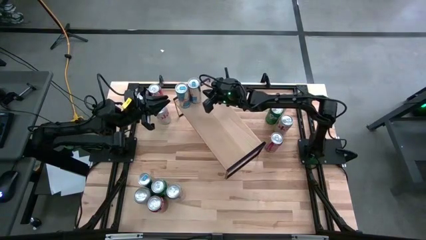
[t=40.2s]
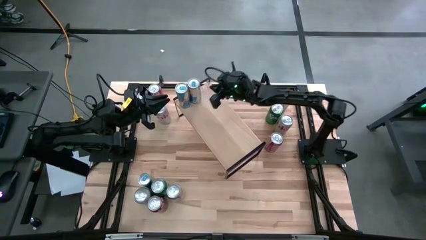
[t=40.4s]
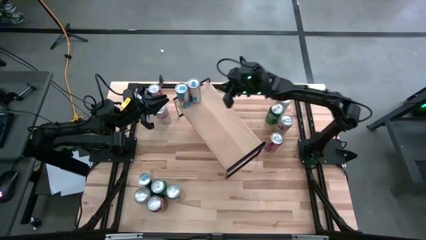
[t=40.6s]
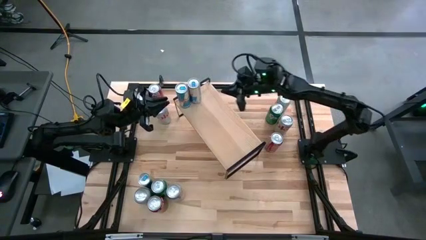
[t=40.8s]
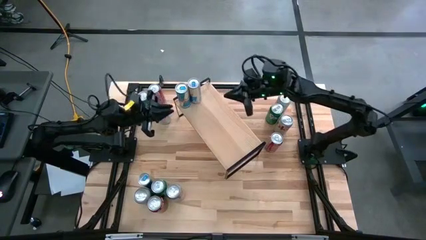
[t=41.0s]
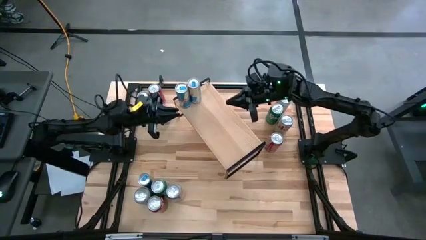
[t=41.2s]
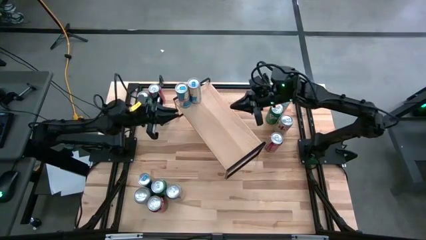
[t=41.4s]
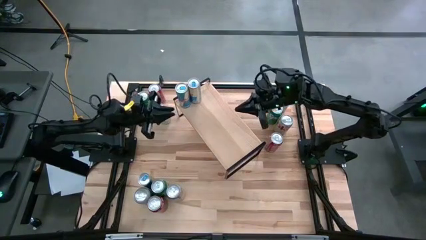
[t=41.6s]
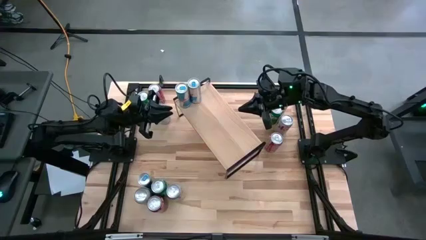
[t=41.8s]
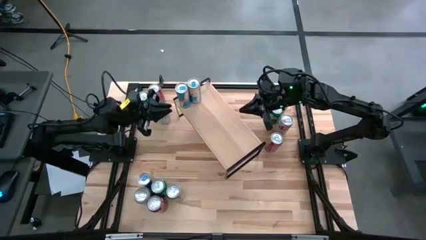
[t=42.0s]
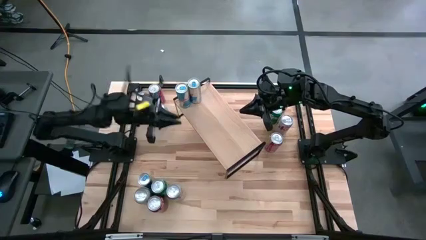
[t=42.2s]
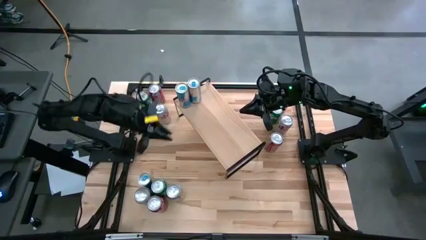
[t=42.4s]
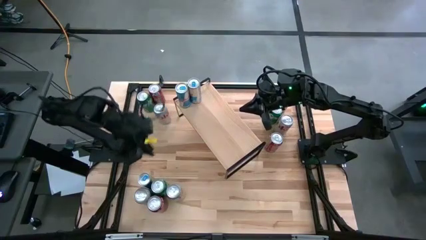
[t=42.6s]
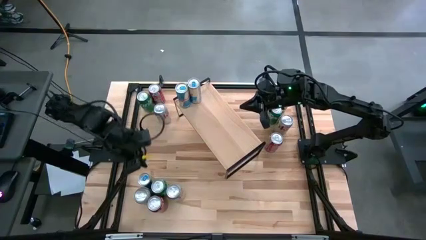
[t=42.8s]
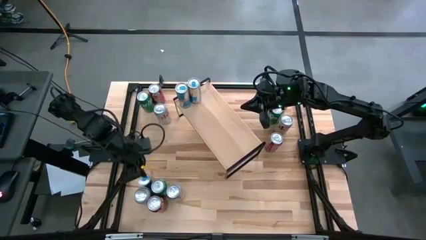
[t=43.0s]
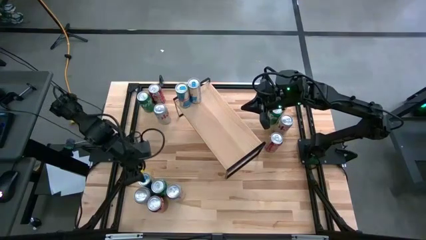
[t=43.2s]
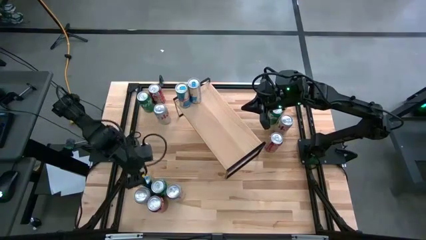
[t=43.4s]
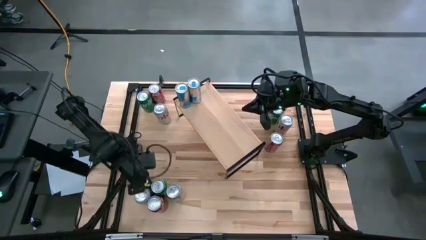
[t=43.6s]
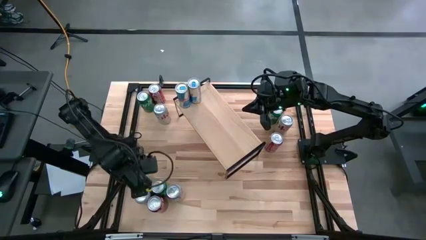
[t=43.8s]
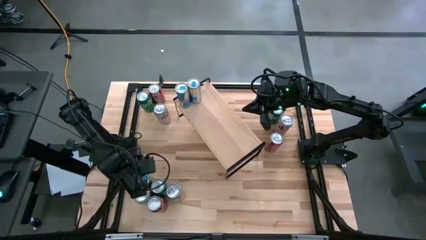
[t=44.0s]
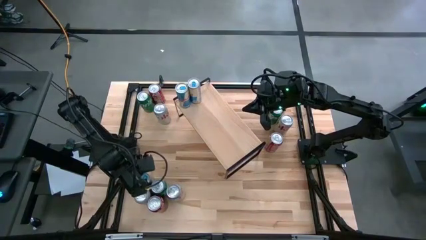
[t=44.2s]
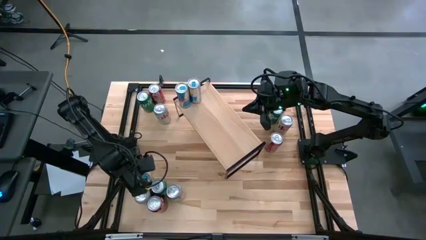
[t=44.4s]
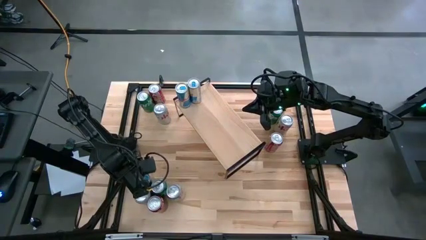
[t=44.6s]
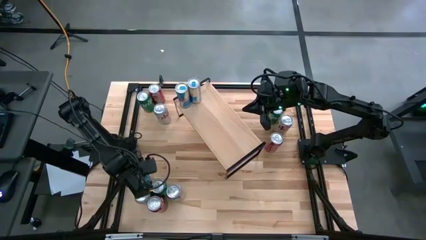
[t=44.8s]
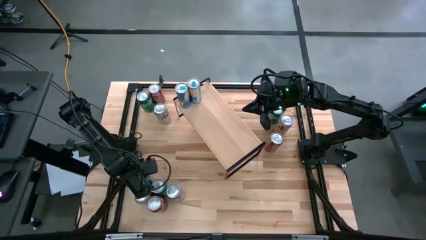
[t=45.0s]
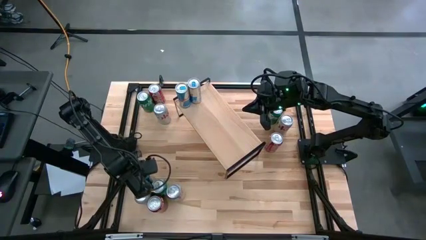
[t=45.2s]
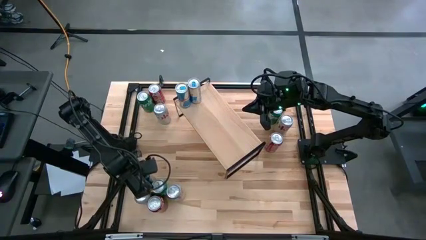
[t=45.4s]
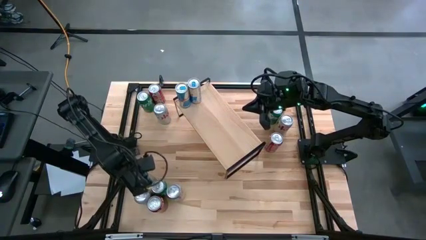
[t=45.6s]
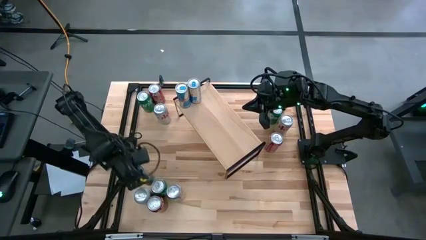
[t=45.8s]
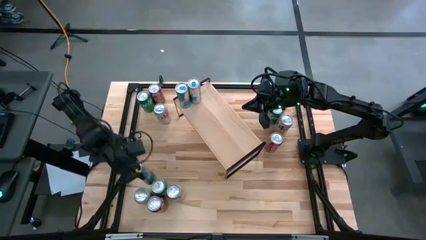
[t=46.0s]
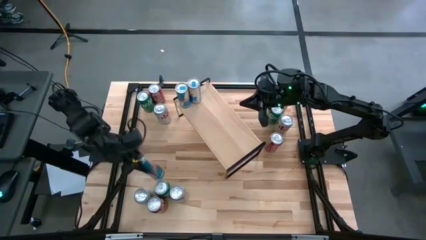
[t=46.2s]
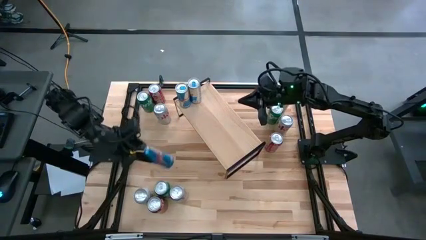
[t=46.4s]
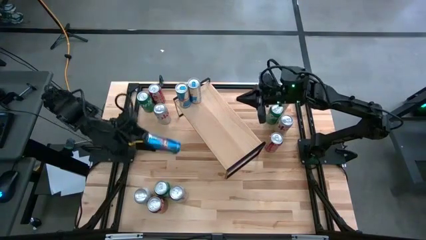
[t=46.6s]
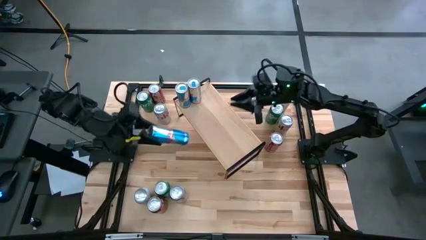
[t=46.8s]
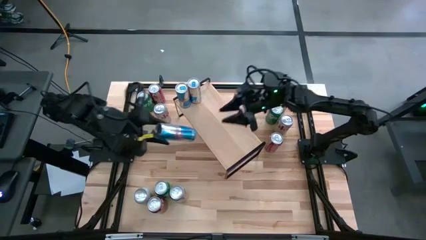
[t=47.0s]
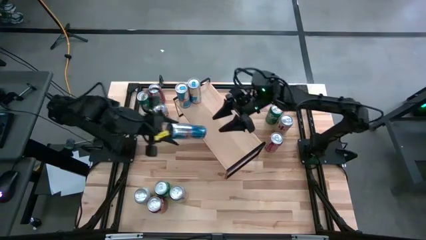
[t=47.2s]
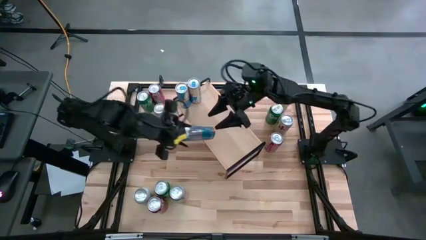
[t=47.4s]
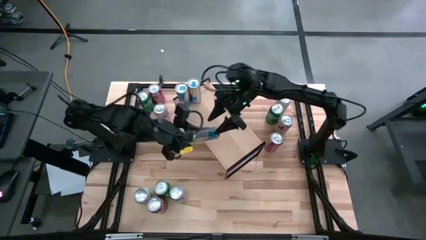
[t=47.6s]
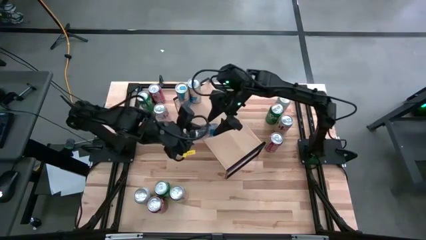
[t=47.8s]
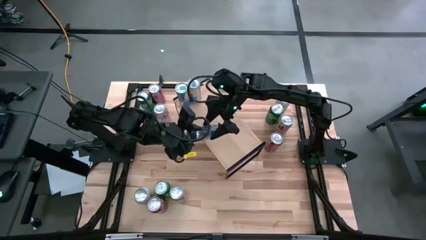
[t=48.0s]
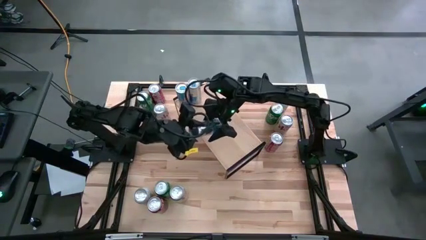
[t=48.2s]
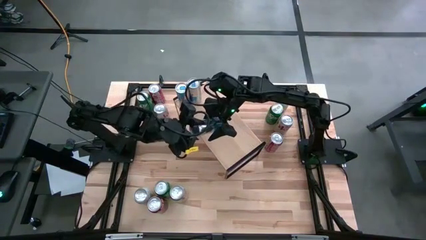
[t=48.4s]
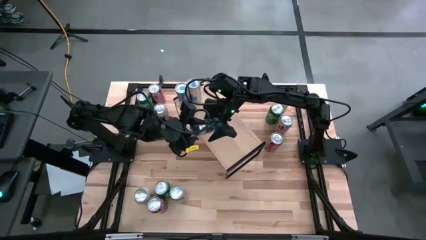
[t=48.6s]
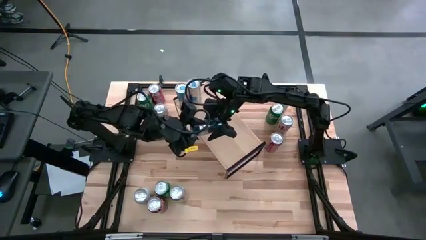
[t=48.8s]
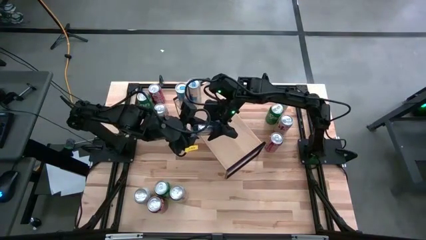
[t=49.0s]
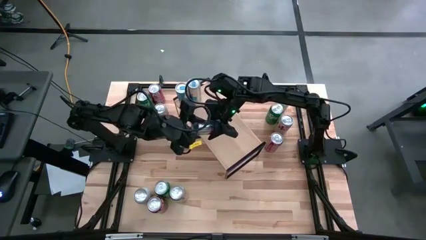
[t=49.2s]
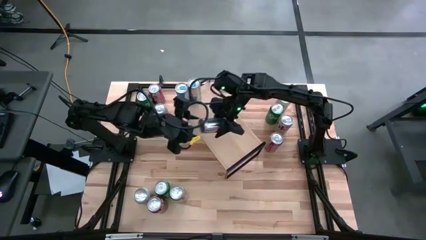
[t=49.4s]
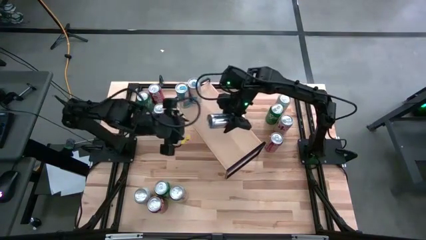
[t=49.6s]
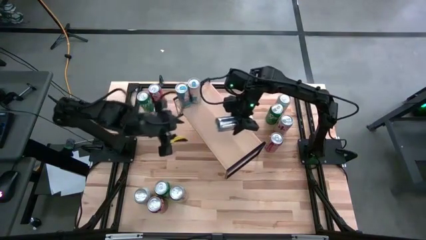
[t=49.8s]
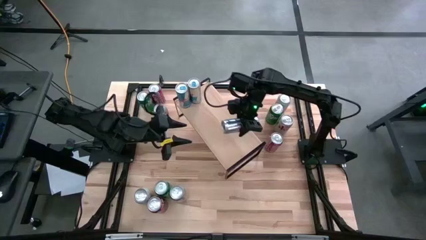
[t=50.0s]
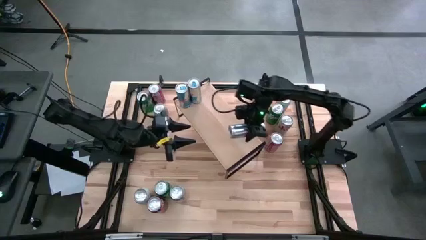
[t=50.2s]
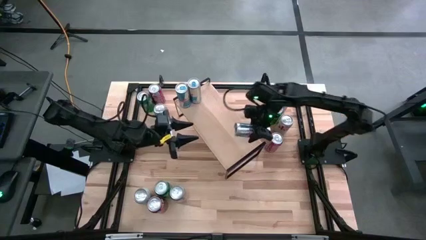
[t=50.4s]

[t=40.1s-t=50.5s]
Task: Place canned beverage on shelf
Put the blue soda can on the shelf aligned with the other blue soda cans
